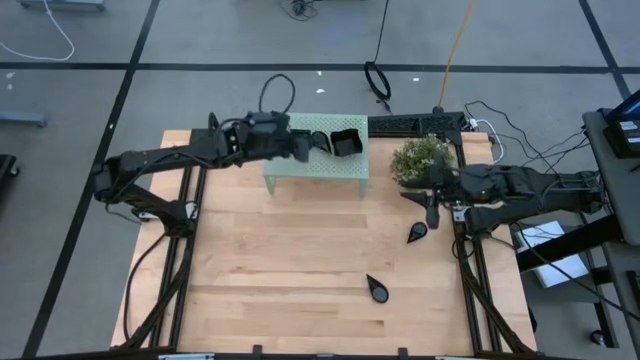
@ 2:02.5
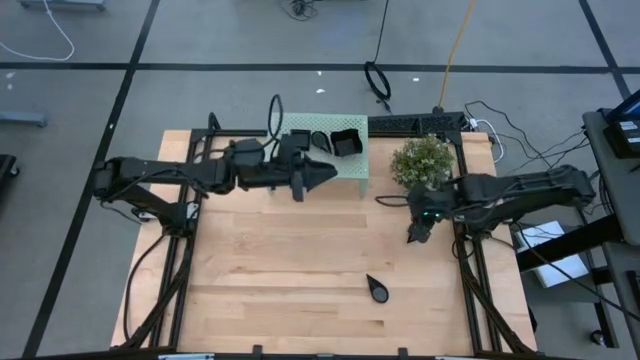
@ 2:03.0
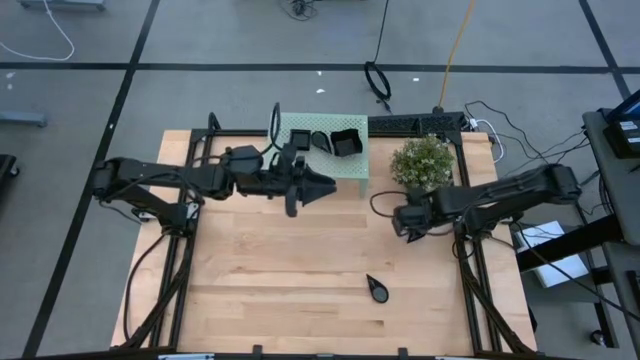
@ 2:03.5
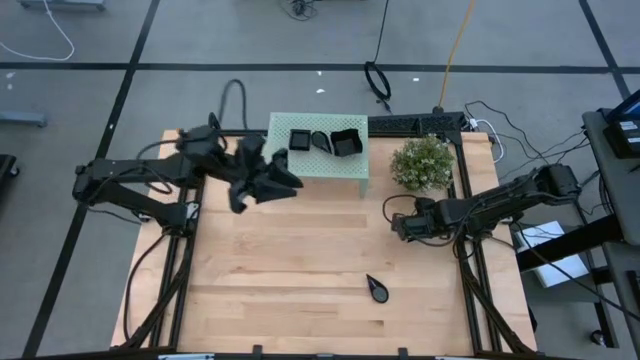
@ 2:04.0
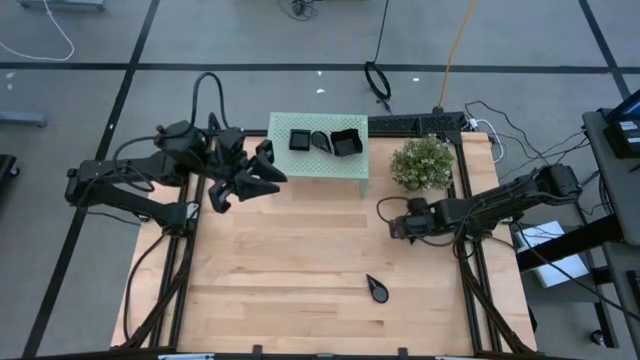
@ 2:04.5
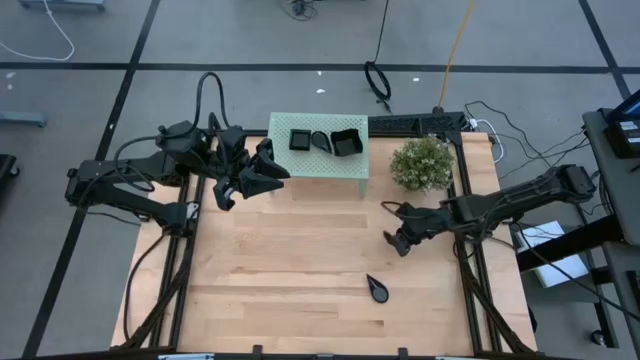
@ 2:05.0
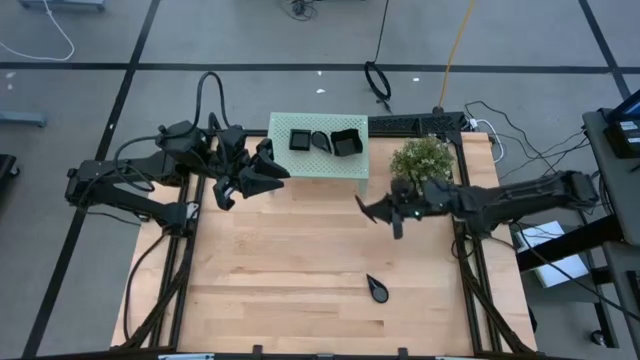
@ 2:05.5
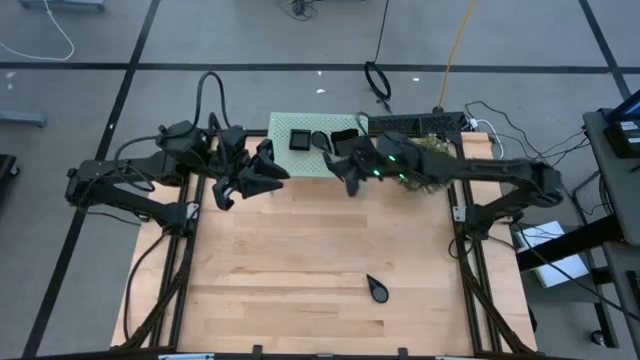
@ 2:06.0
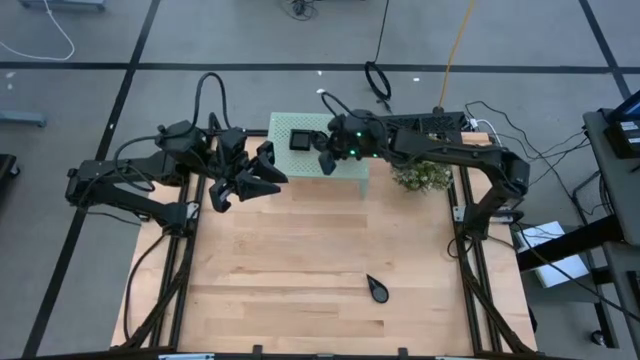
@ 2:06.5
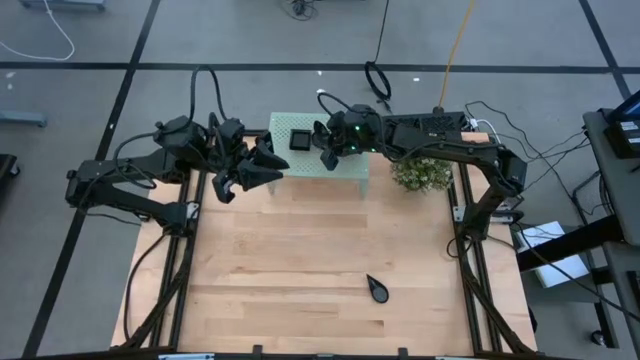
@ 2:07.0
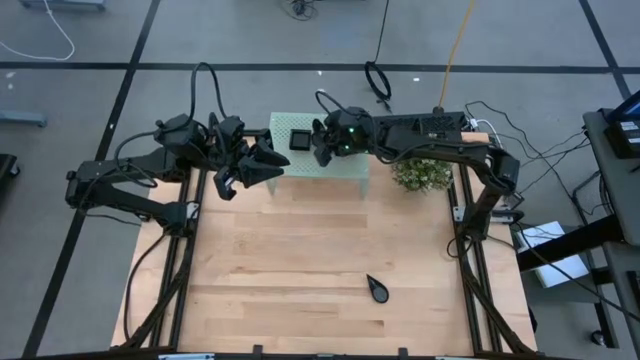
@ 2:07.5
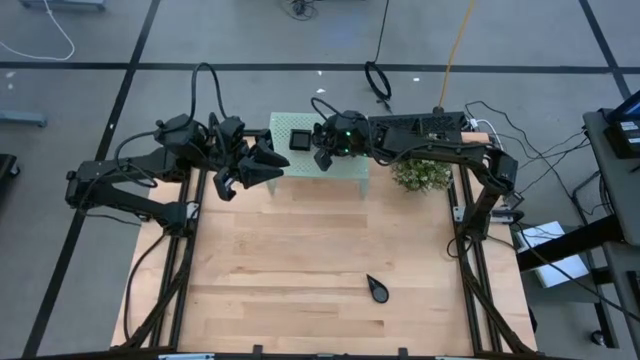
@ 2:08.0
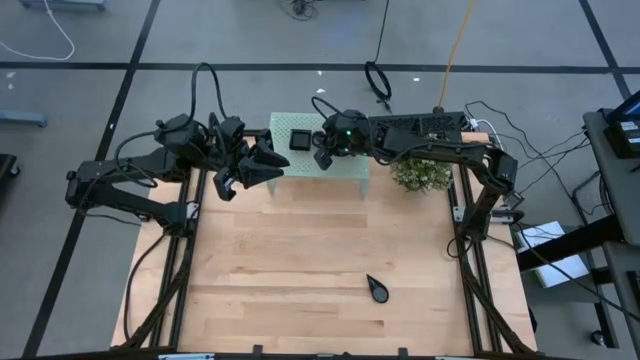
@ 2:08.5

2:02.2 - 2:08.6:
Task: Pick & Place Mini shaped plates
Stack the black drop-shaped plate on top of the other black drop-shaped plate on the shelf

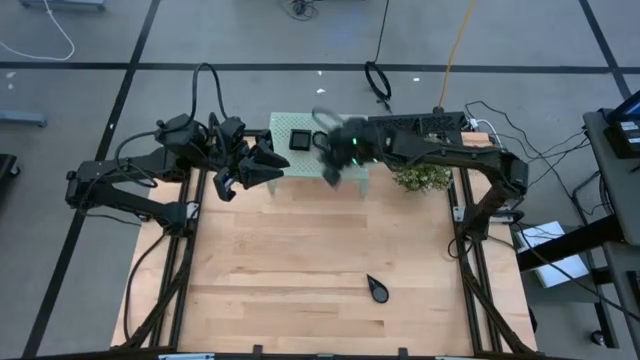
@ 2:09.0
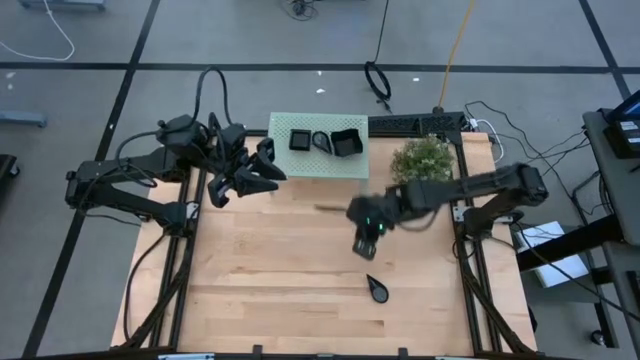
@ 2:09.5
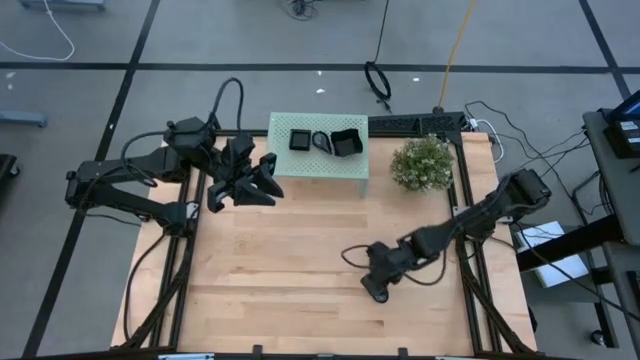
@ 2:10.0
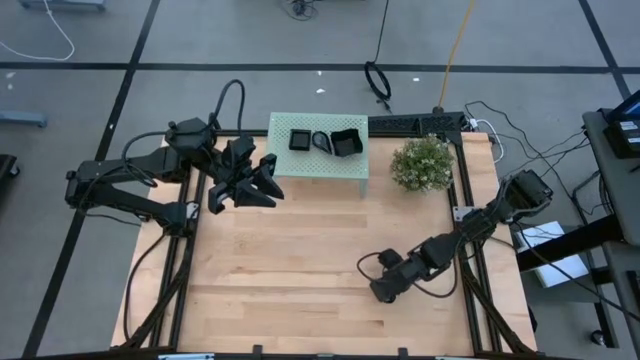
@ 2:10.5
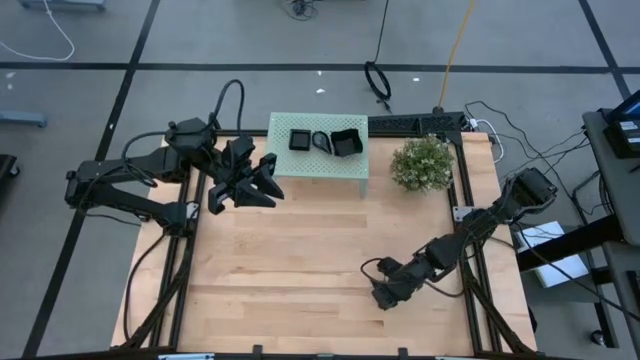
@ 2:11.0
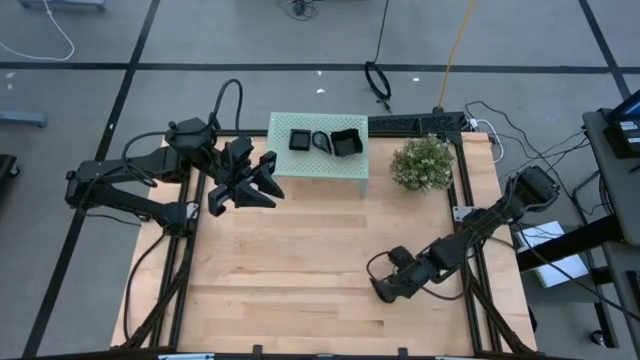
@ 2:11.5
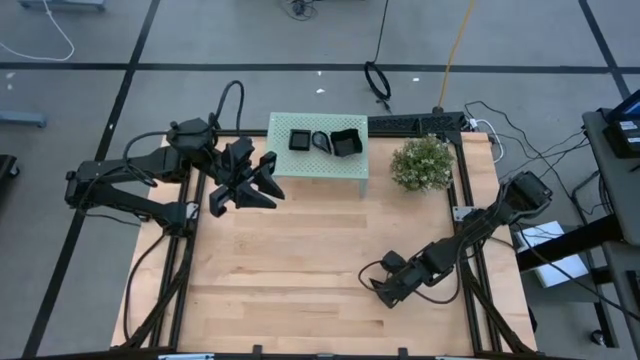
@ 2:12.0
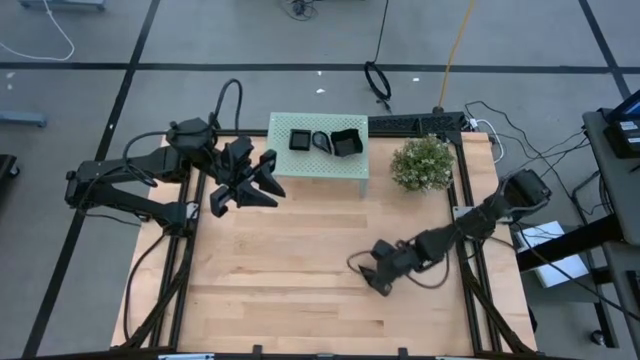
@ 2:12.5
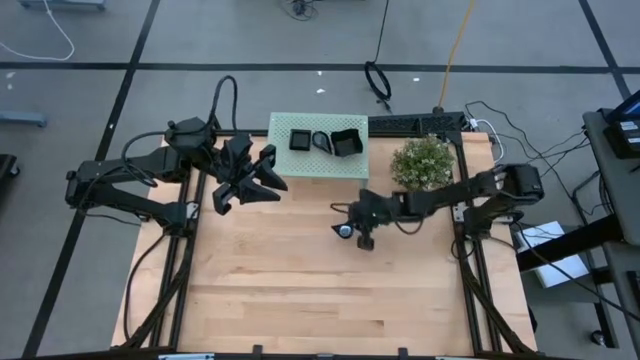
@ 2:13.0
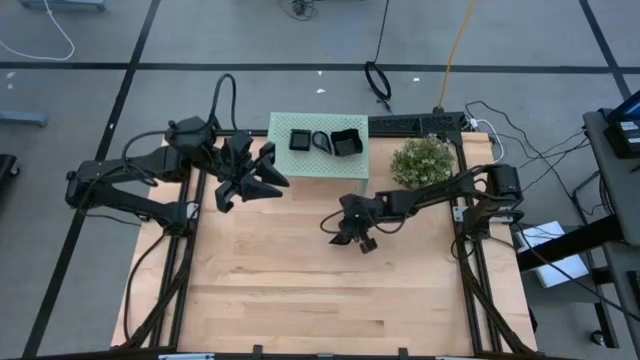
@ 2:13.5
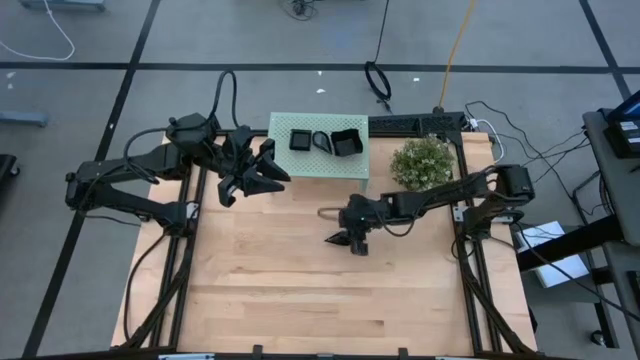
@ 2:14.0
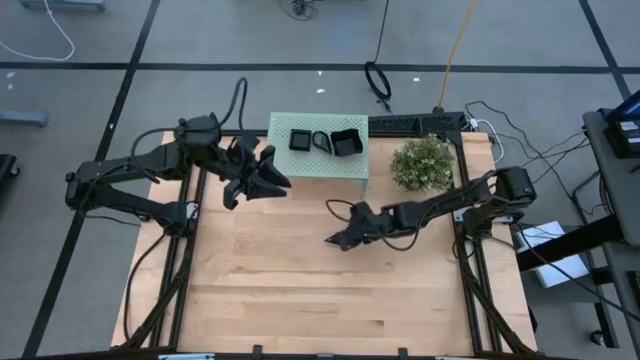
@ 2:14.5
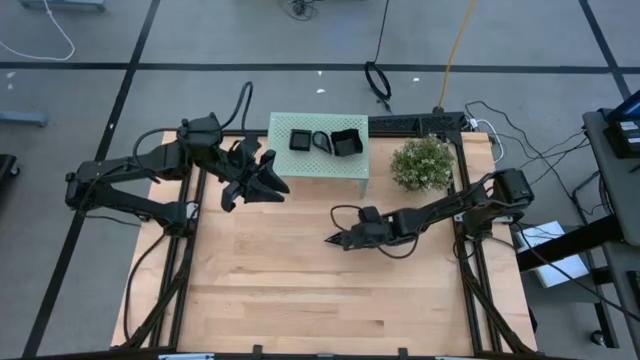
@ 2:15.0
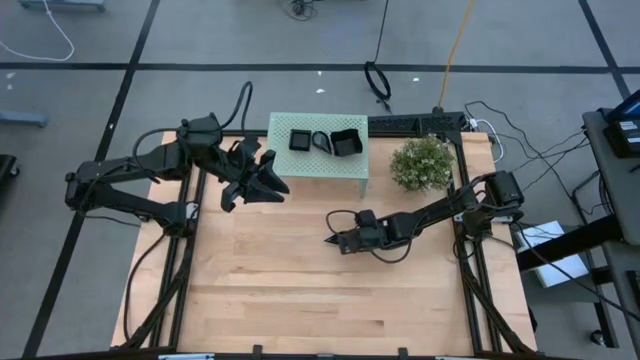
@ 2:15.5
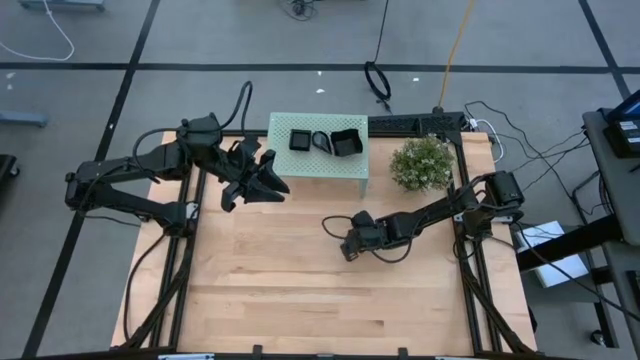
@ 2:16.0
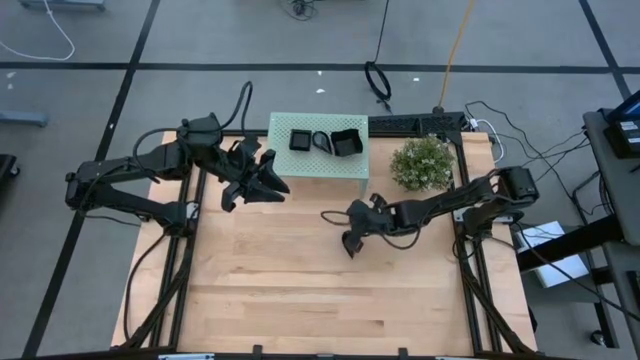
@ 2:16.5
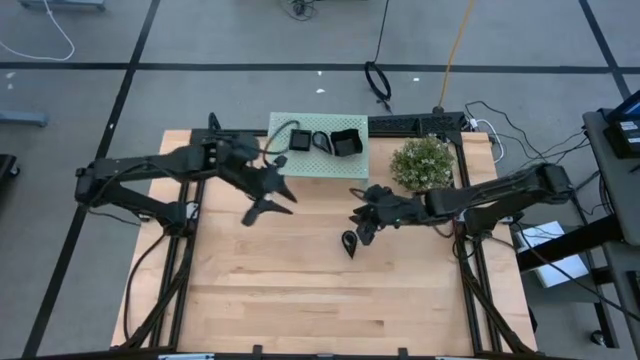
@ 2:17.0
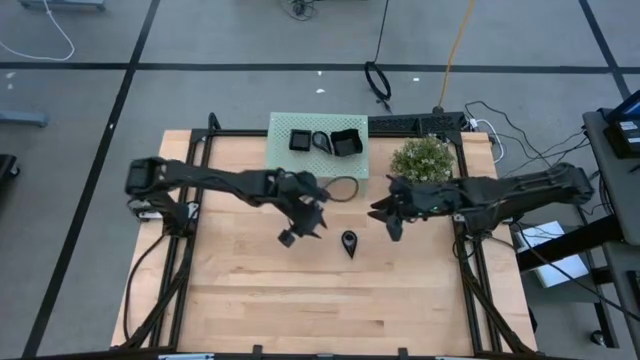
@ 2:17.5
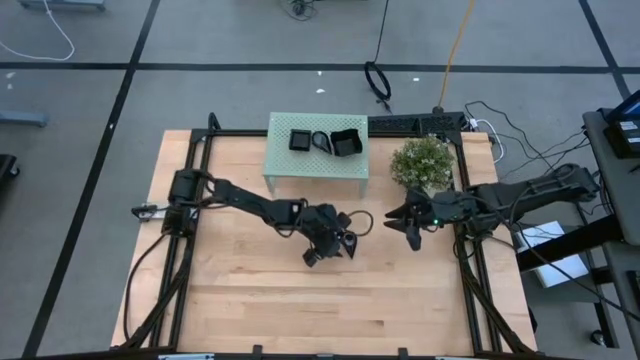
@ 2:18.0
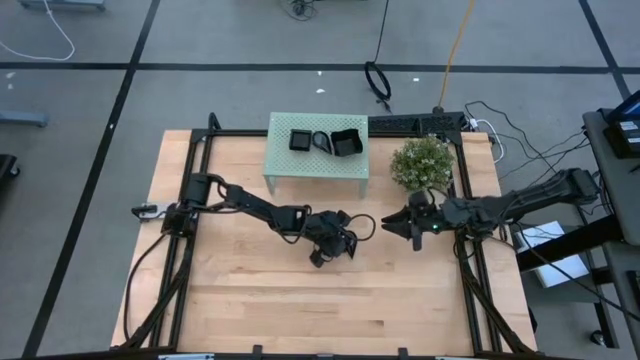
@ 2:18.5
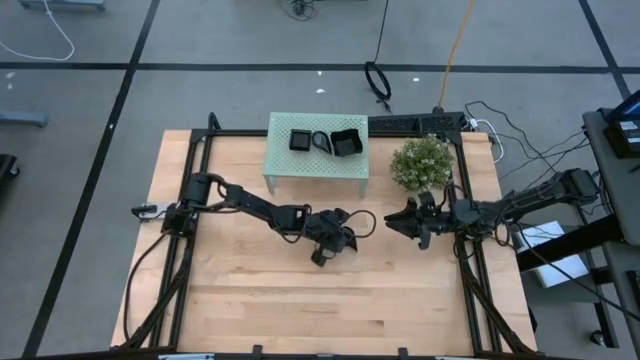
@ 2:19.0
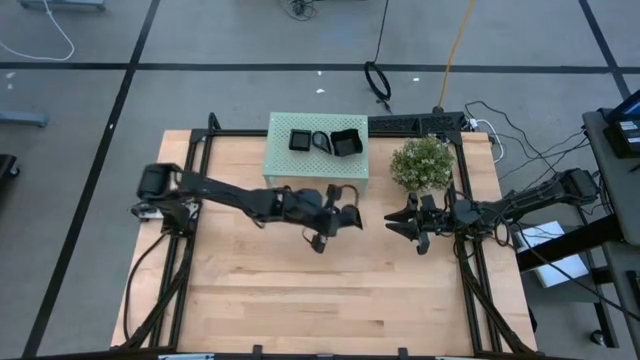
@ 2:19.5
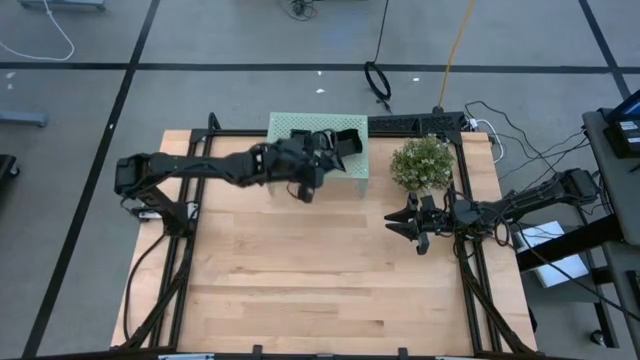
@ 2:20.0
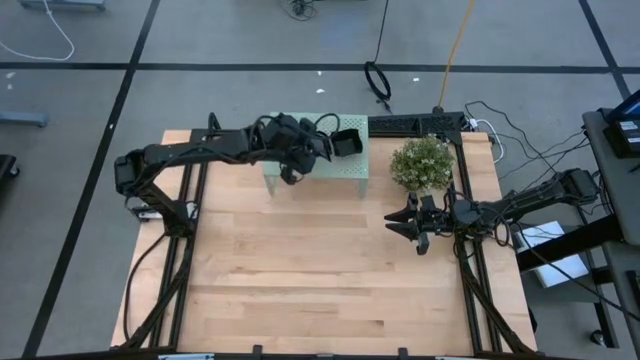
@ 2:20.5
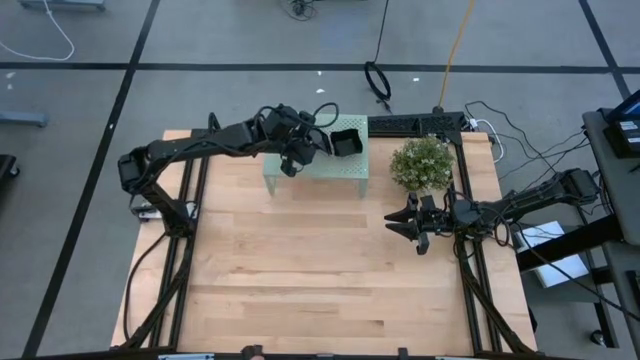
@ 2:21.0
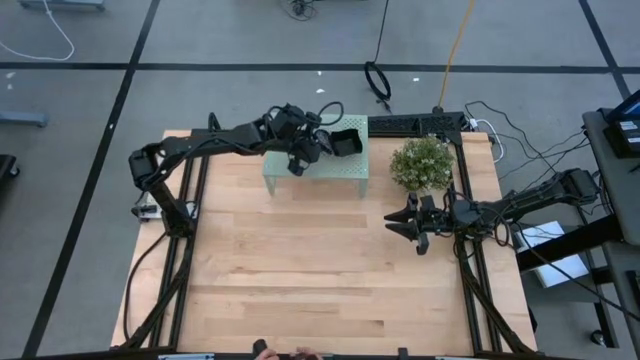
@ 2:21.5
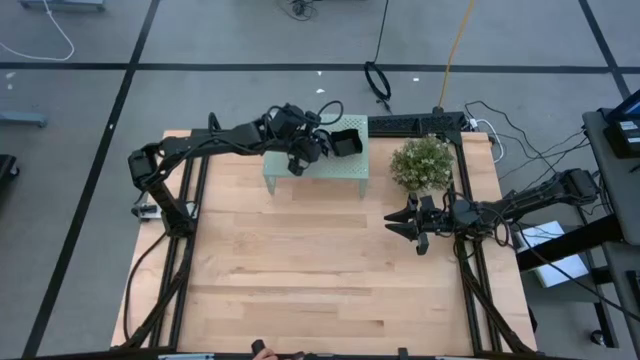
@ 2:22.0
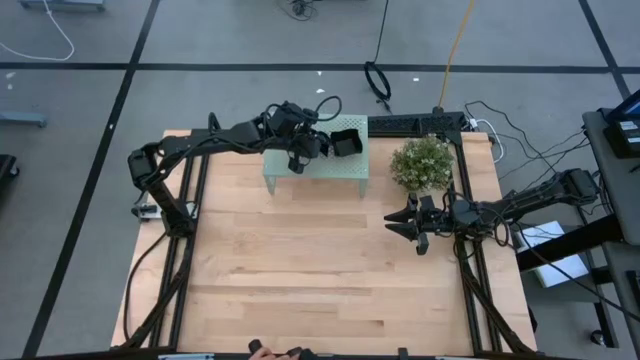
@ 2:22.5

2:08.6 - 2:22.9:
Stack the black drop-shaped plate on top of the other black drop-shaped plate on the shelf
